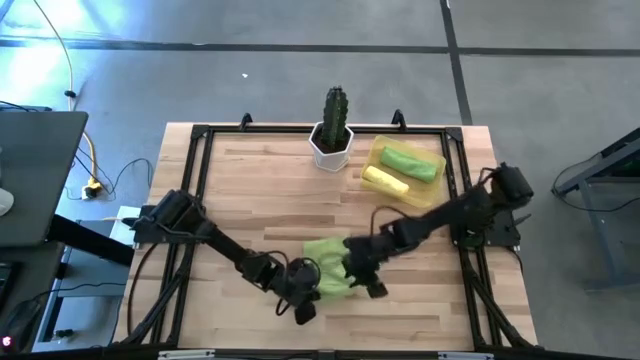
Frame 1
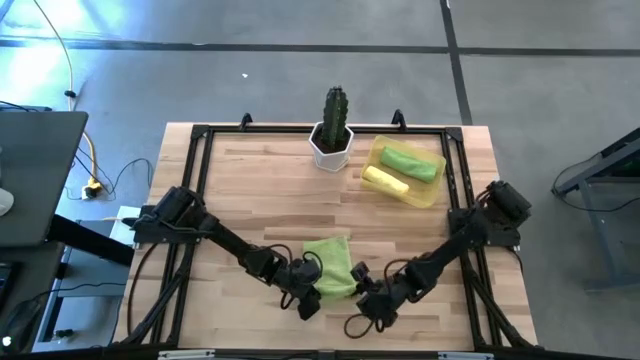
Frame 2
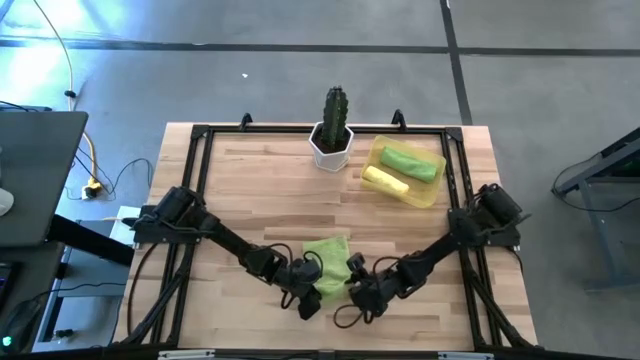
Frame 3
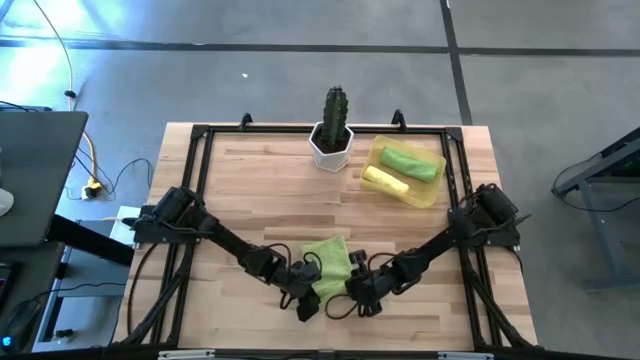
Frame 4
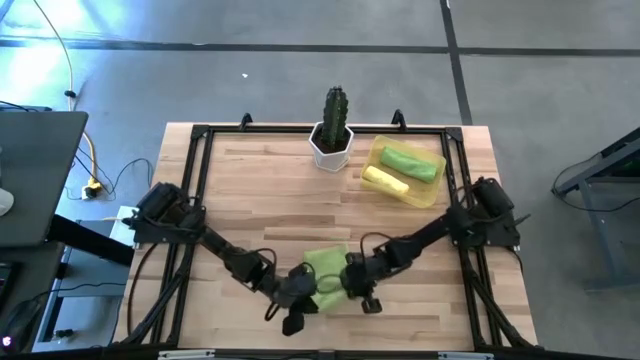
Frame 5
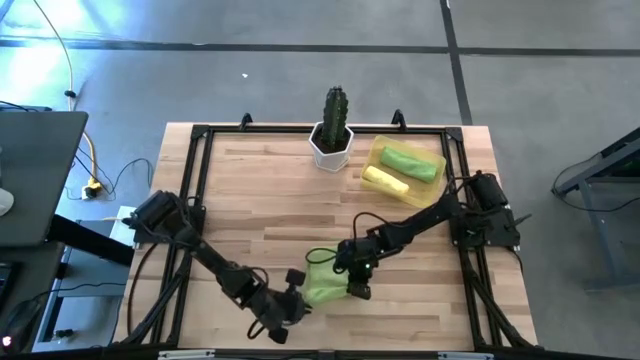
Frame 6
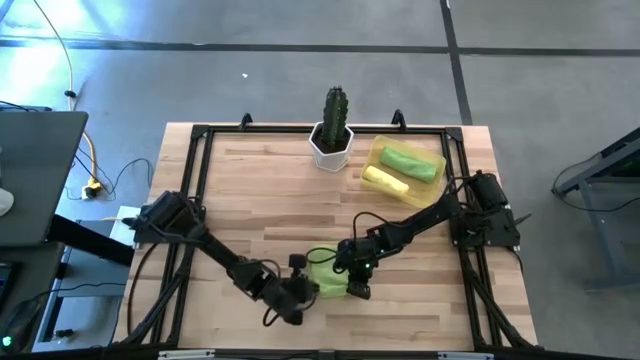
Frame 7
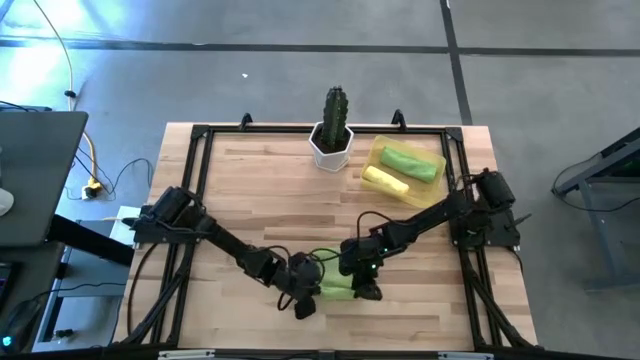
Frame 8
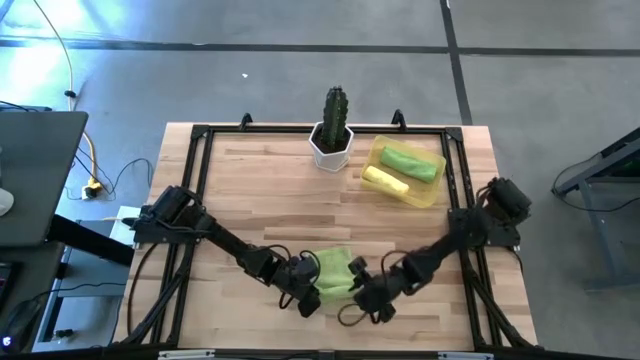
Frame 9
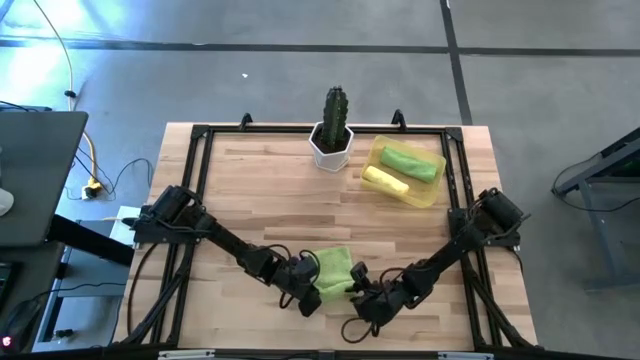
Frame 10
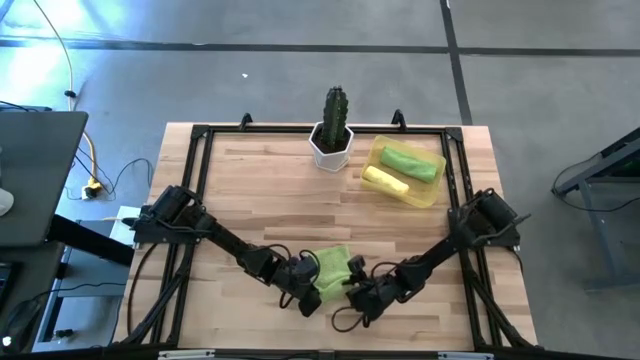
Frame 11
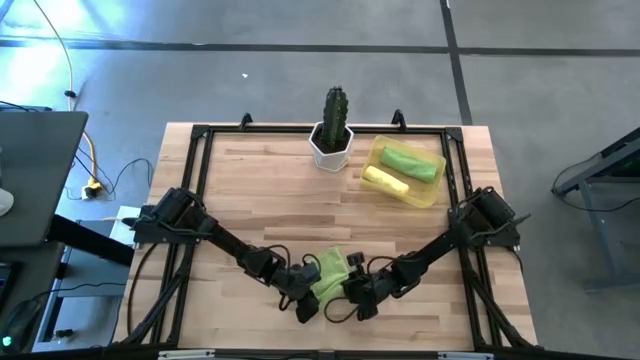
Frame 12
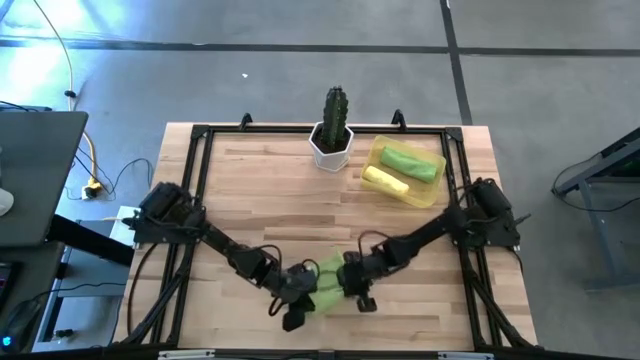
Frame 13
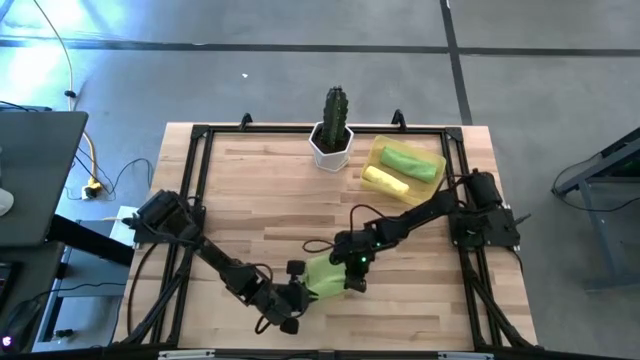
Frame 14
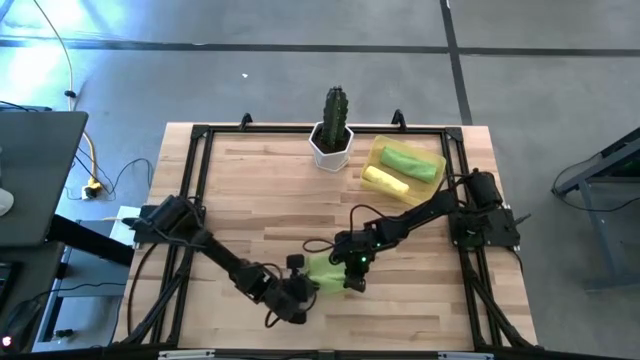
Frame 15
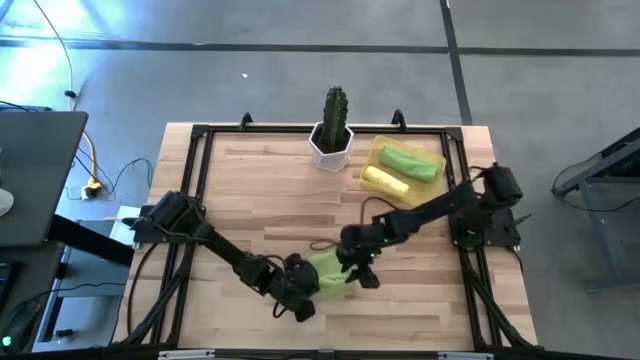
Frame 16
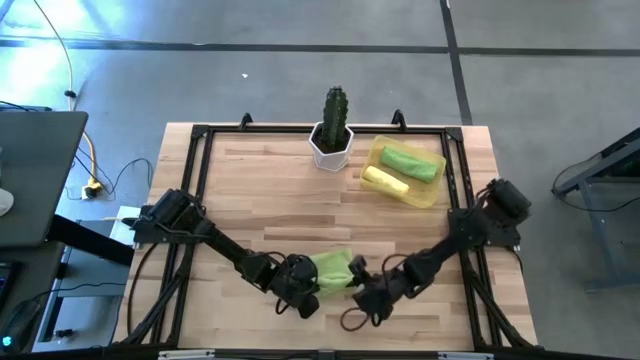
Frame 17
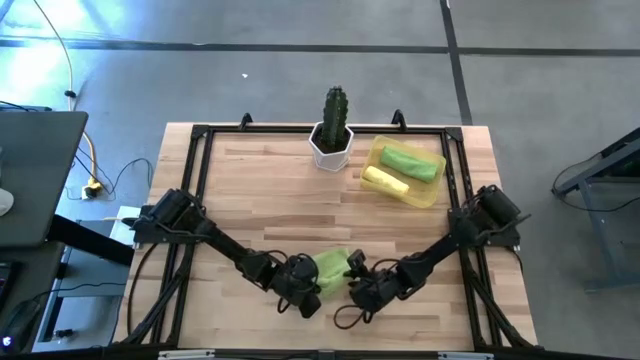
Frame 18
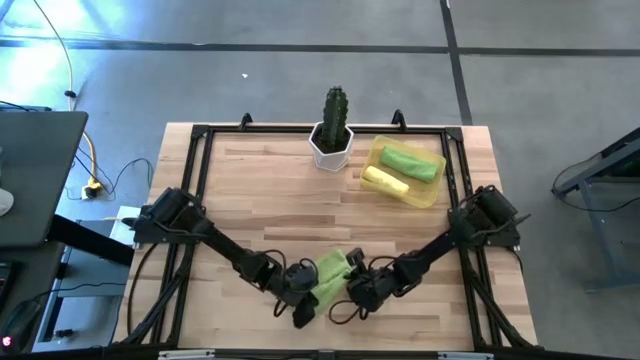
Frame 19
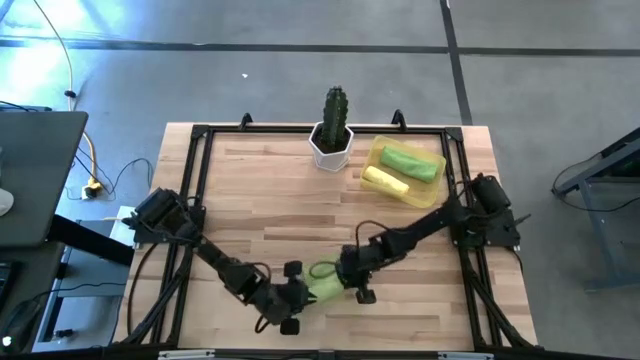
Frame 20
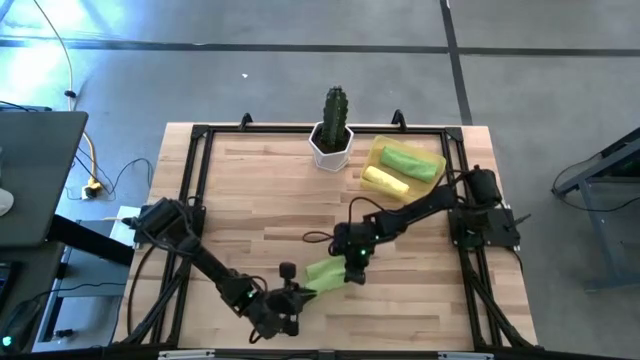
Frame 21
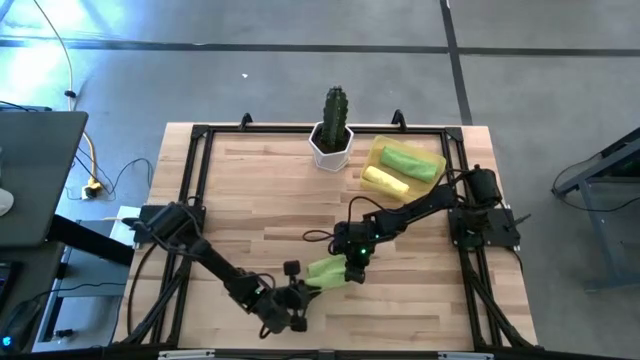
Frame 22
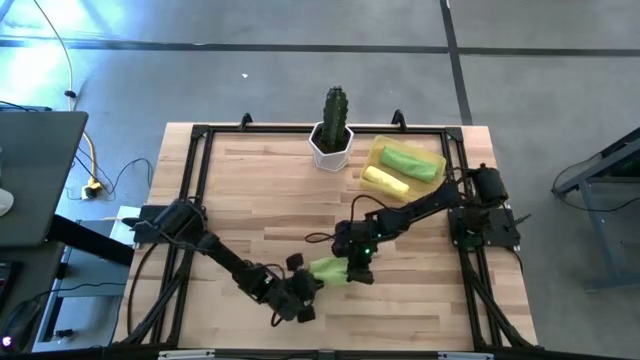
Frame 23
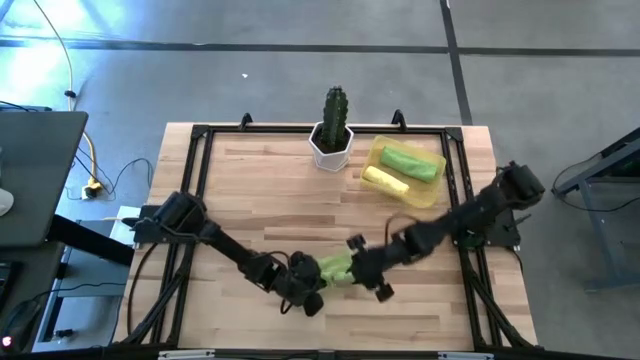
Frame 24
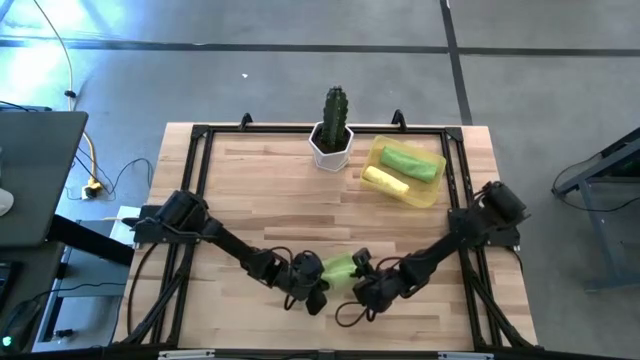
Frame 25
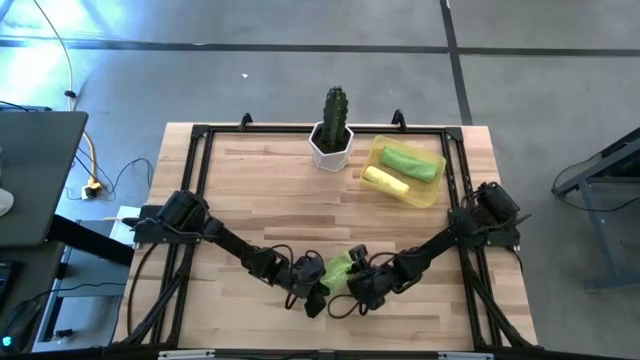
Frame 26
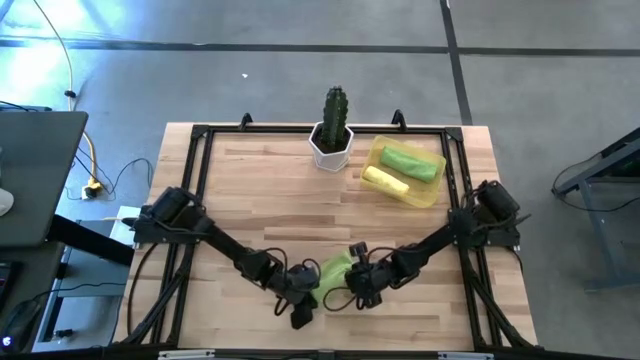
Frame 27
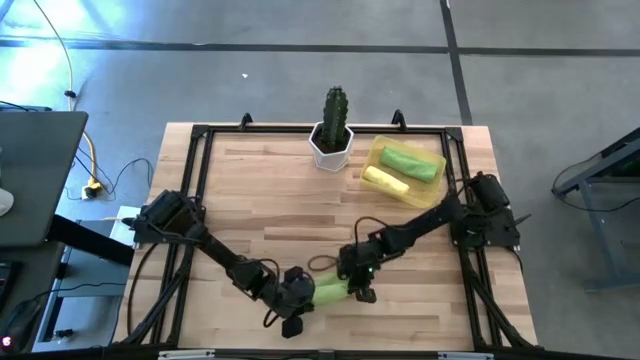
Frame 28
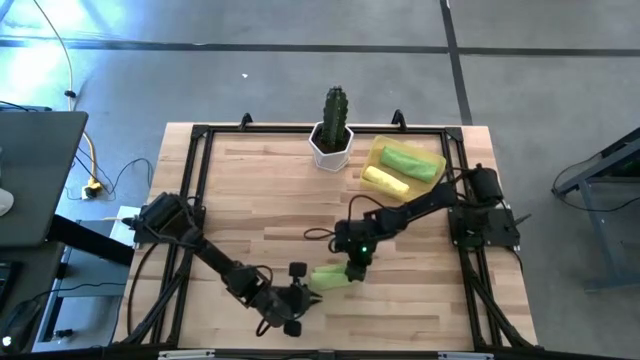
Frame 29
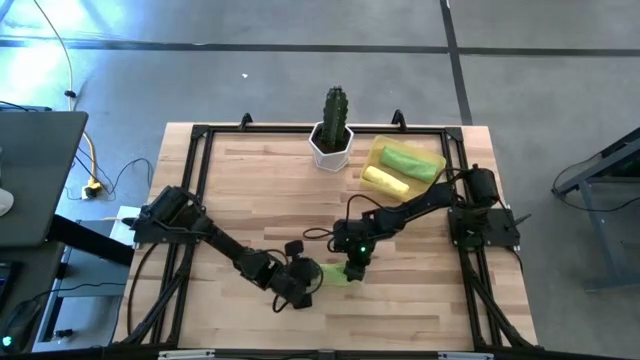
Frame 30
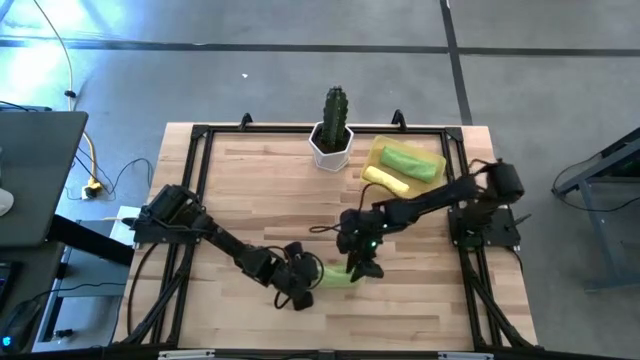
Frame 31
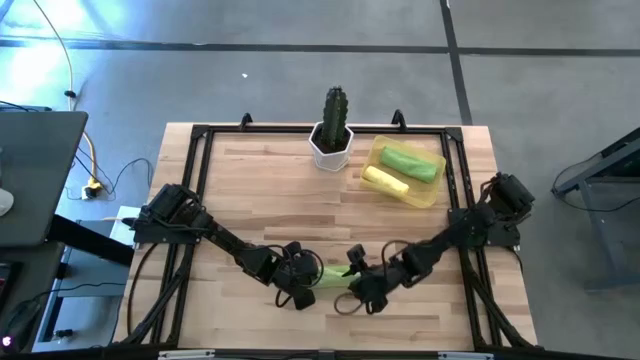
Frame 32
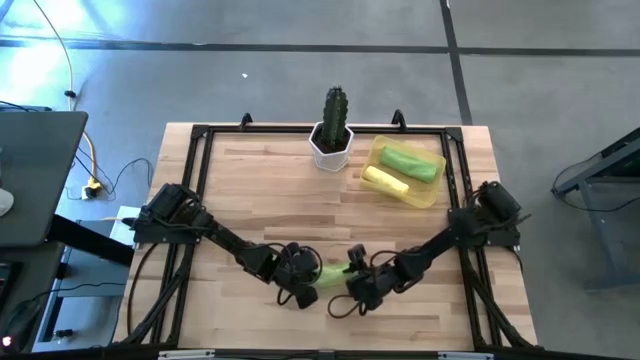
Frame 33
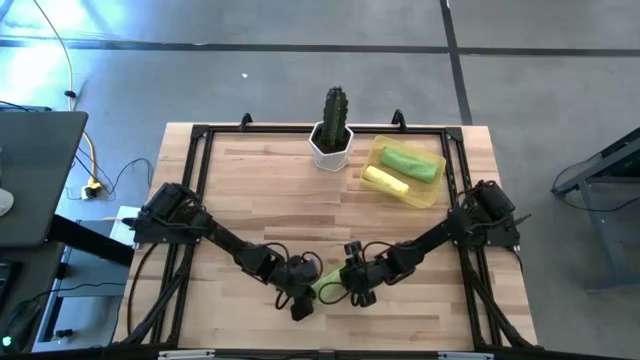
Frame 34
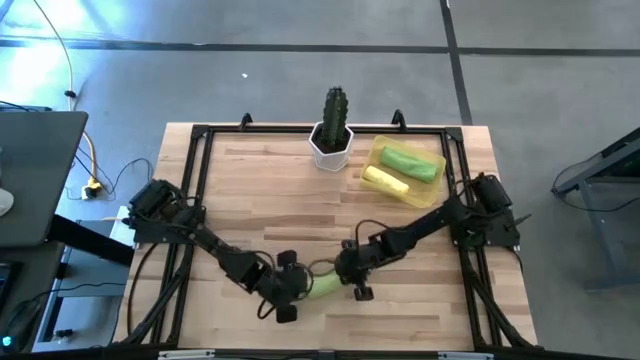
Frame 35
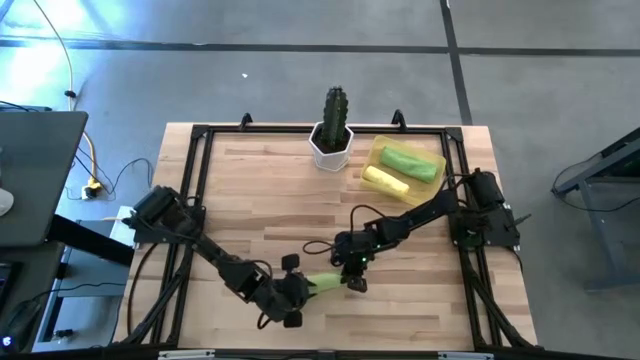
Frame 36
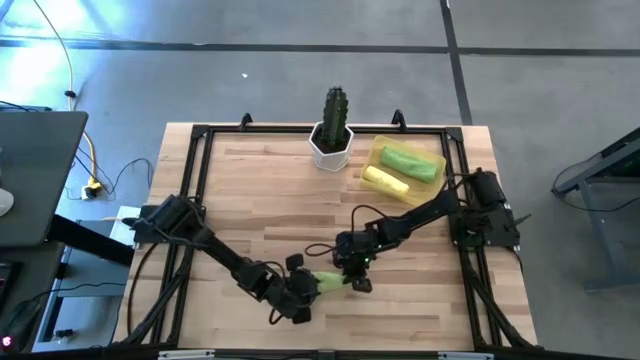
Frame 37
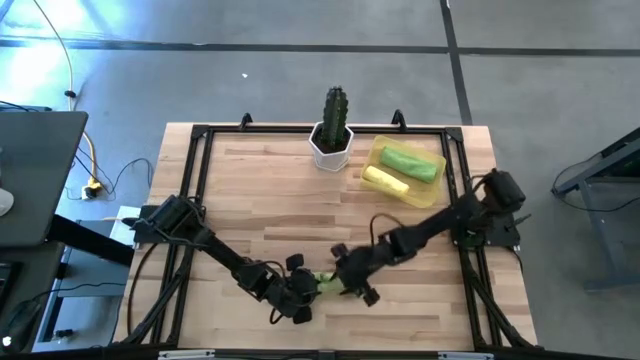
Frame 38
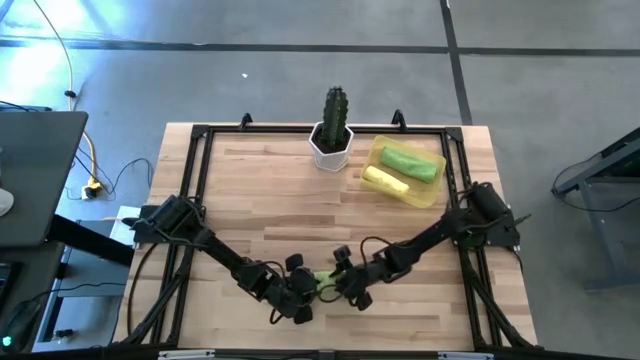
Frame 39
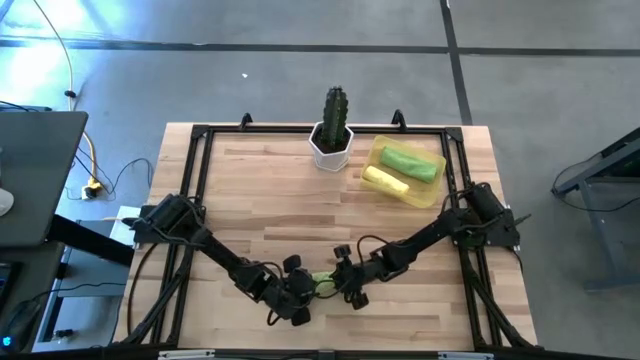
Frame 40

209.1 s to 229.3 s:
Task: Roll microfiber towels into tight, uniform cylinder then place into a basket
Roll the light green towel

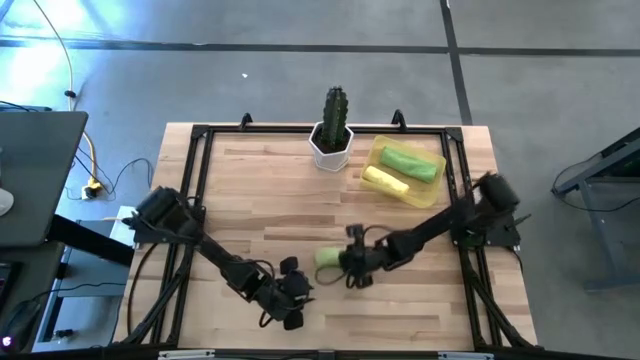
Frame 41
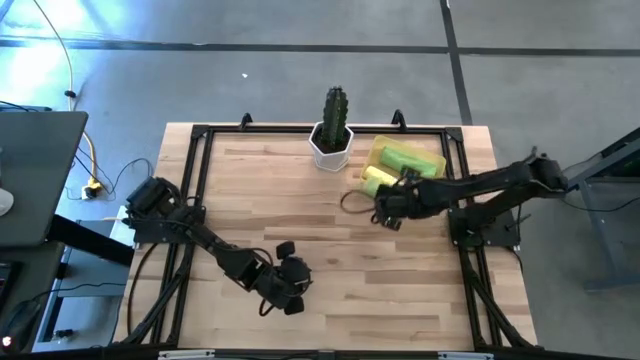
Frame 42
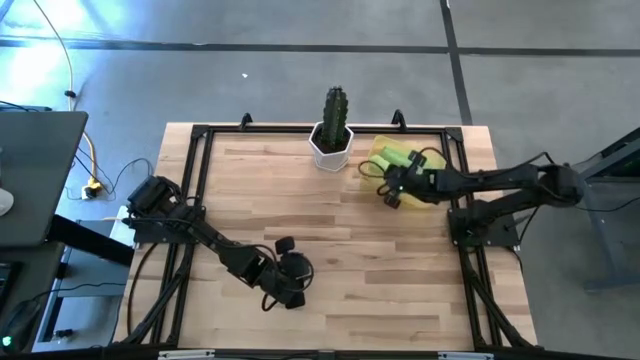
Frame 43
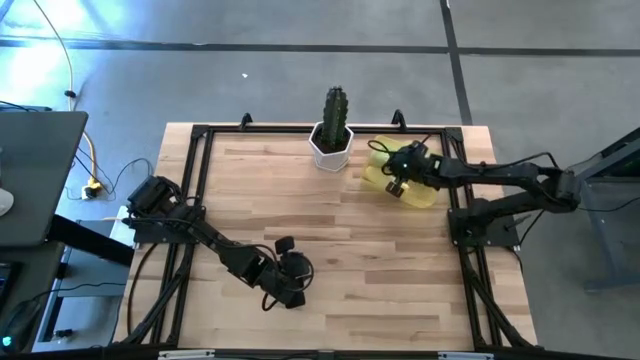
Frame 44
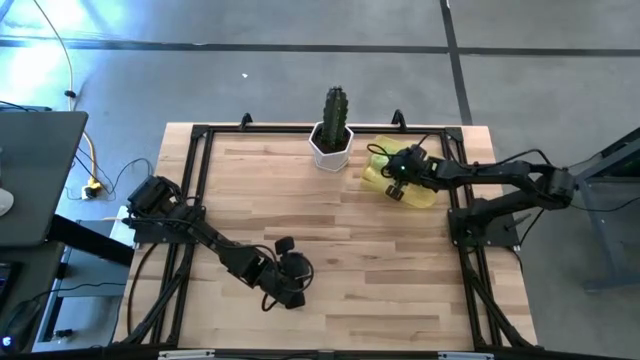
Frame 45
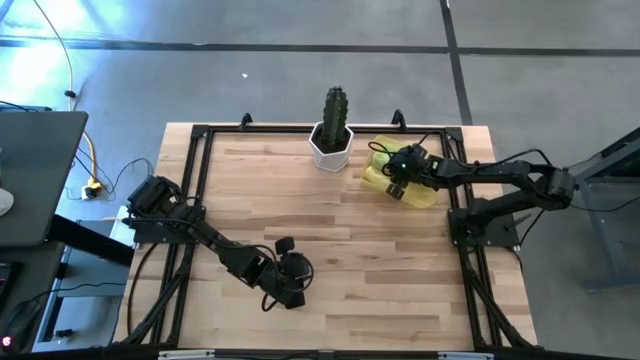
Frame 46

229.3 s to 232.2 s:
Put the light green yellow into the yellow bin
